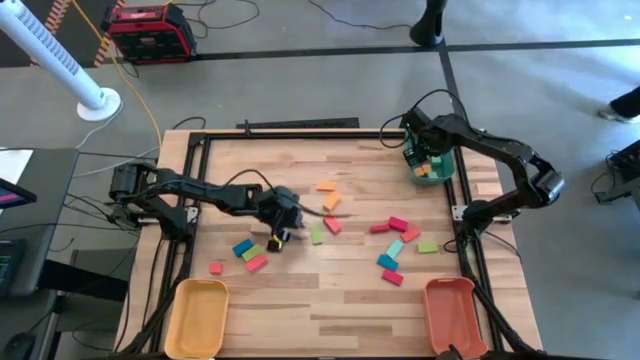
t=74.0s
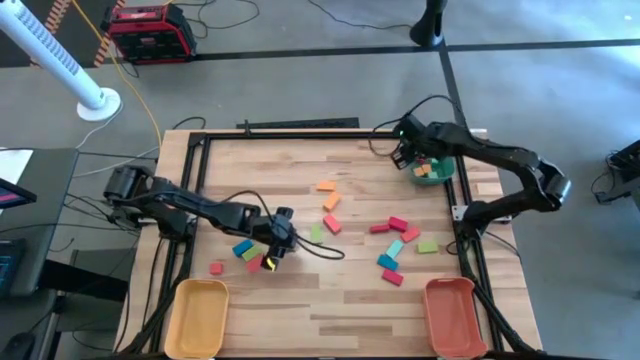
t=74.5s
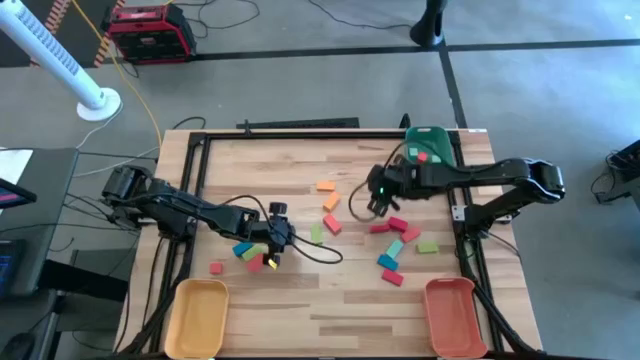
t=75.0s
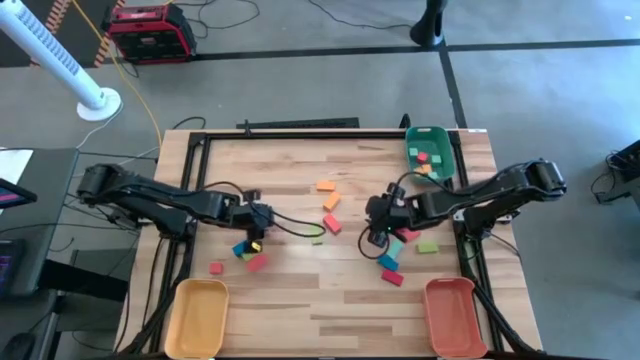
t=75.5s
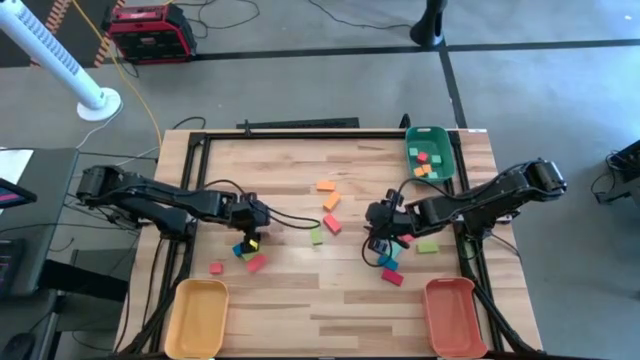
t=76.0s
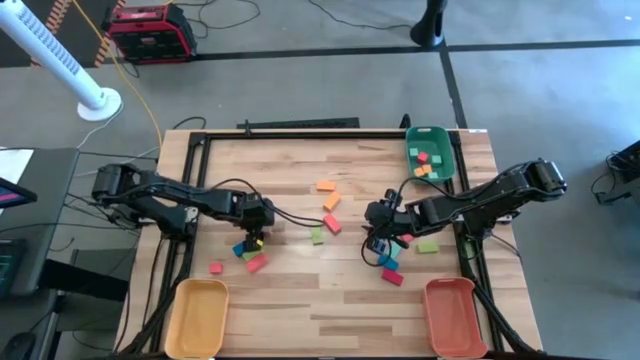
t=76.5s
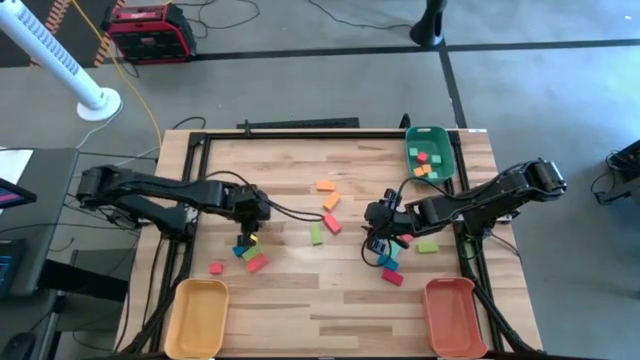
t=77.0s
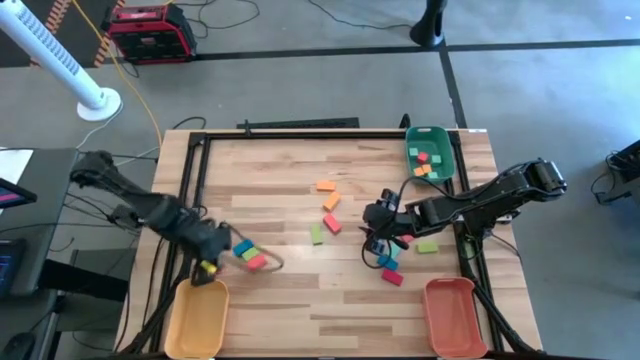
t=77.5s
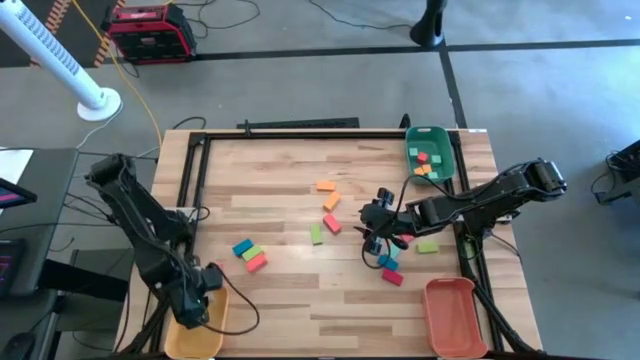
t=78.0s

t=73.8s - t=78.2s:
Task: Sort blocks by size
Put the yellow thick rectangle block into the yellow bin

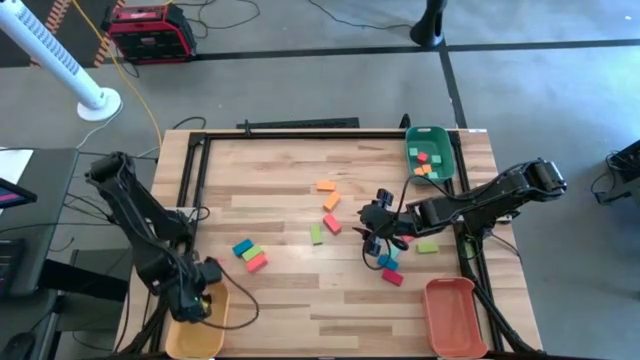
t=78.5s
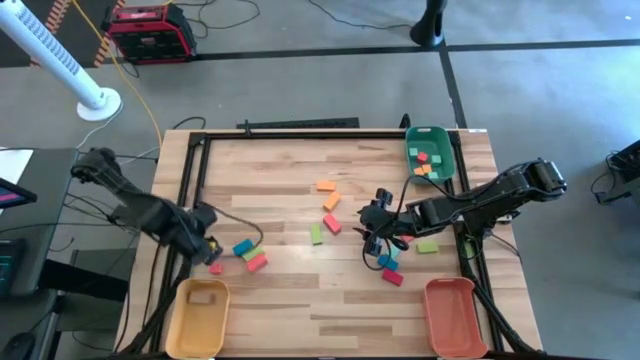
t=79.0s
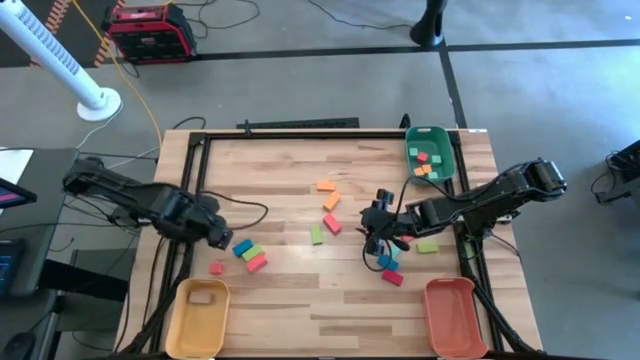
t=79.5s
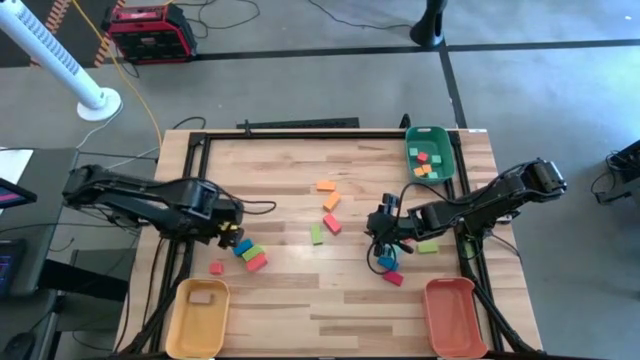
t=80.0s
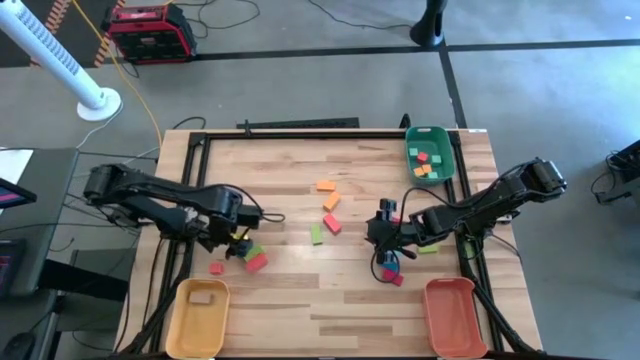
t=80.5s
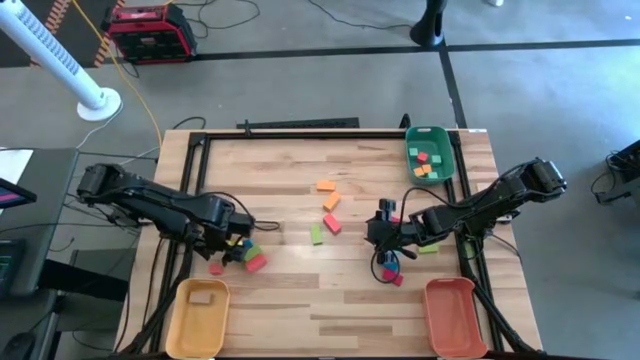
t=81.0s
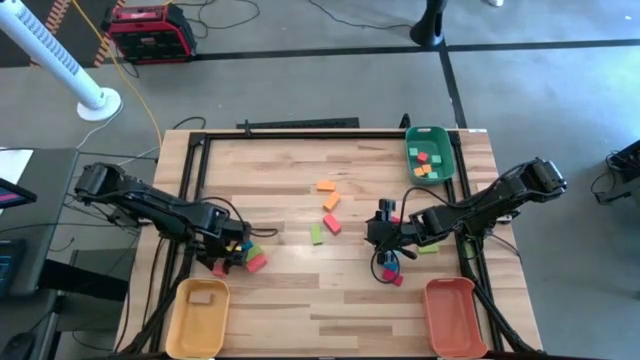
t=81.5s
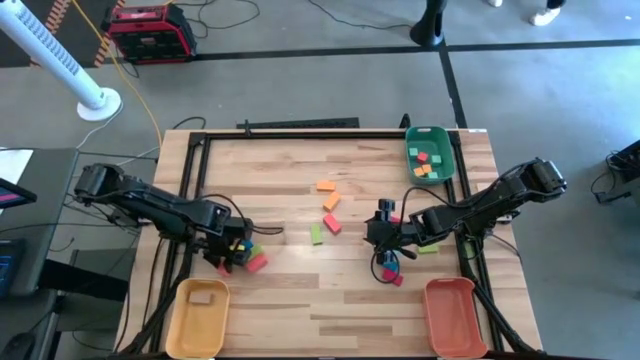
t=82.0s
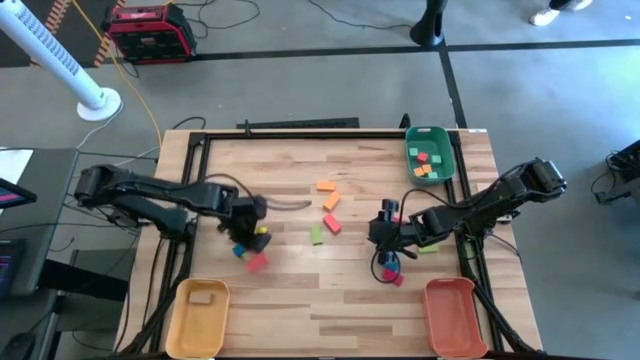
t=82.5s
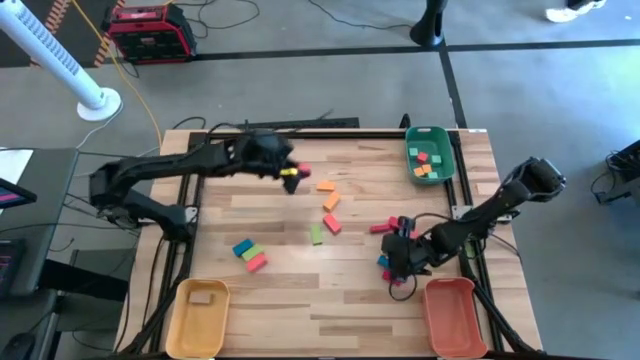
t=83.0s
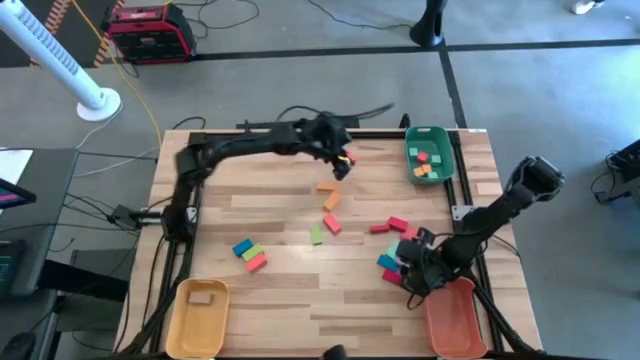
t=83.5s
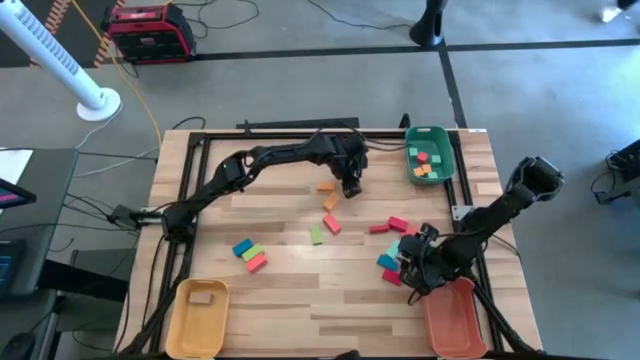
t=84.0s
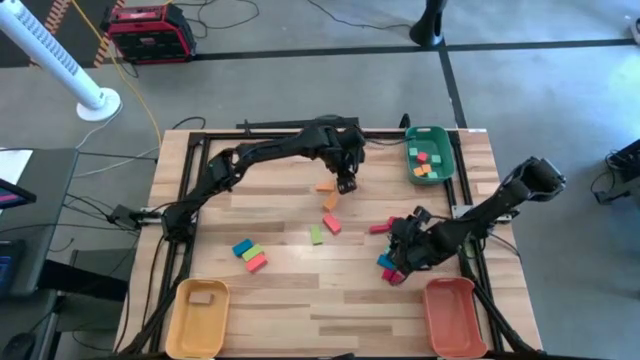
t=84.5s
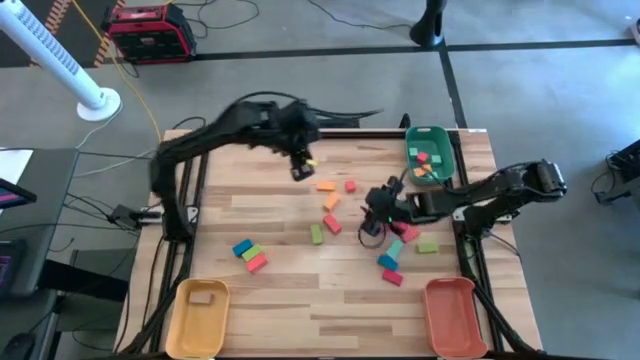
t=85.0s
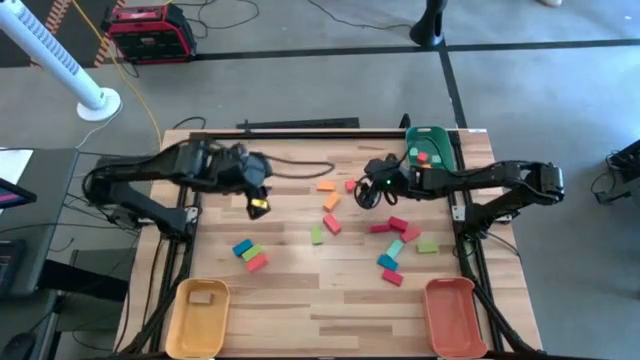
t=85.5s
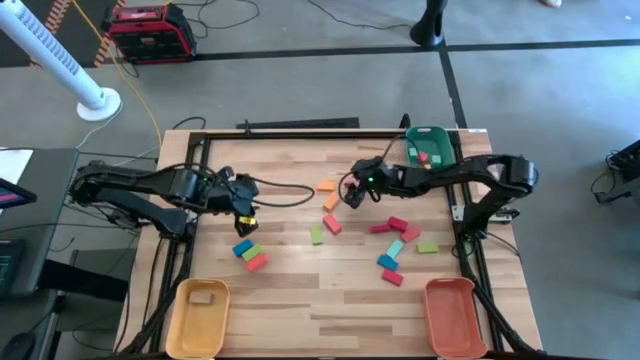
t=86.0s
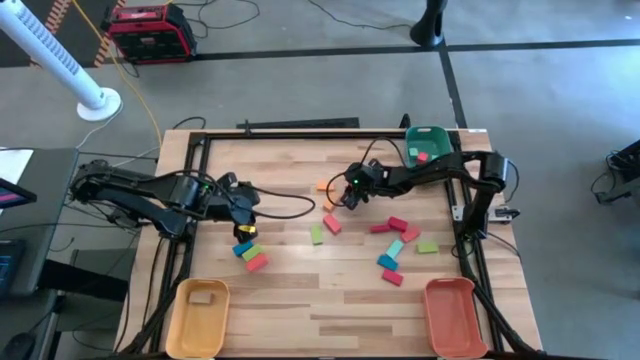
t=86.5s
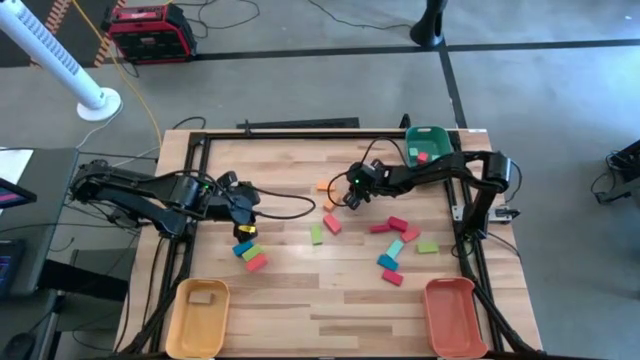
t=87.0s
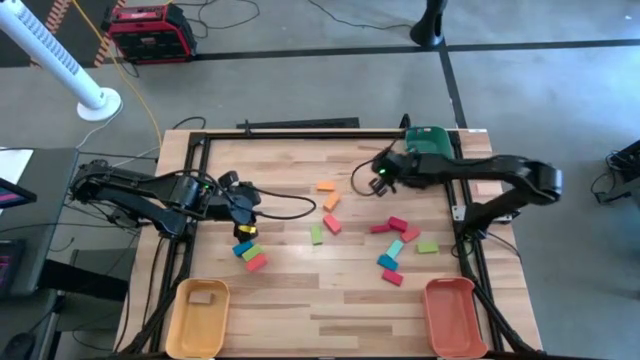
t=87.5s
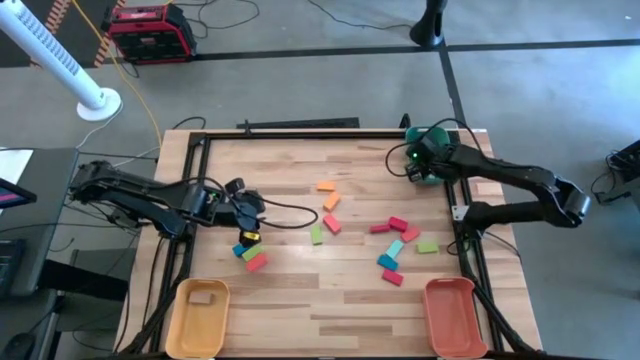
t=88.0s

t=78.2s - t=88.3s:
Put the orange square block into the green bin

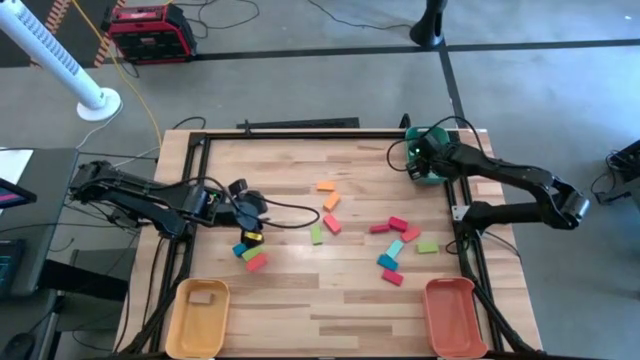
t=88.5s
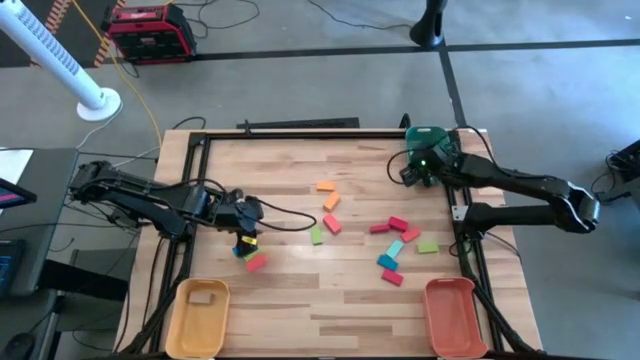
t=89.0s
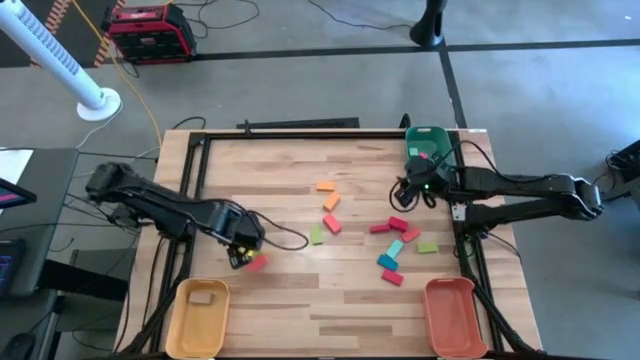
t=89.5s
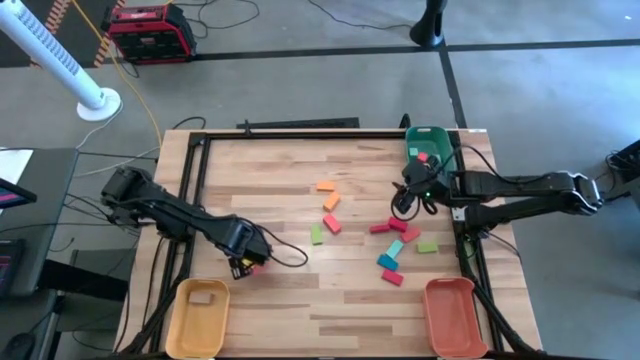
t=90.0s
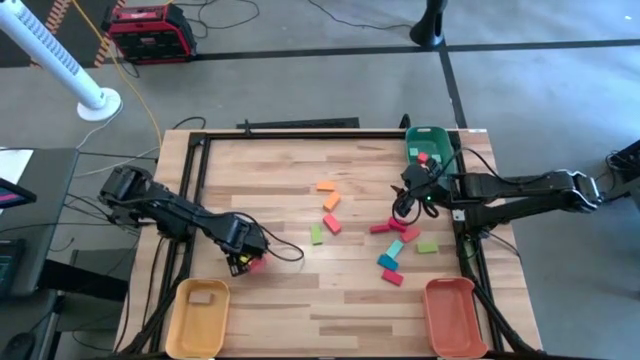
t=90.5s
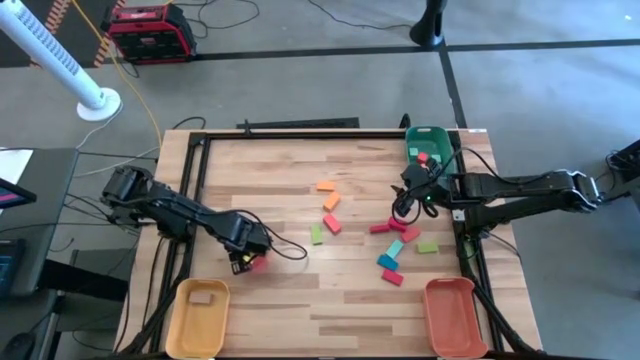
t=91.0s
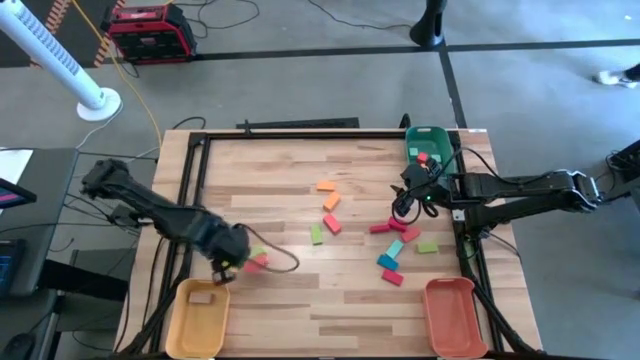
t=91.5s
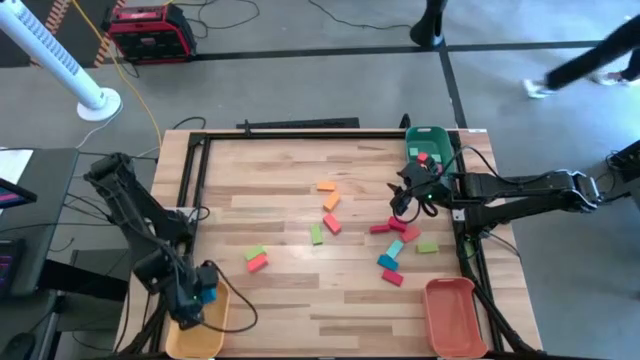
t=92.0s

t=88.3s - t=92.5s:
Put the blue thick rectangle block into the yellow bin

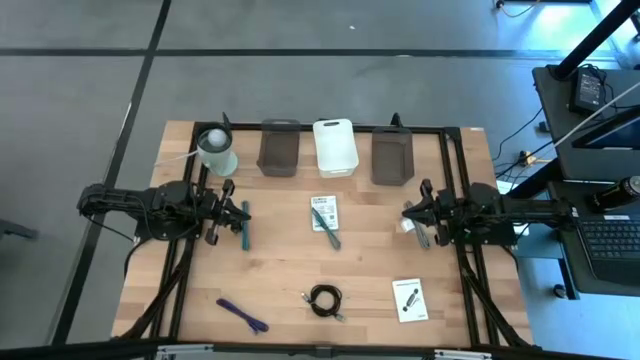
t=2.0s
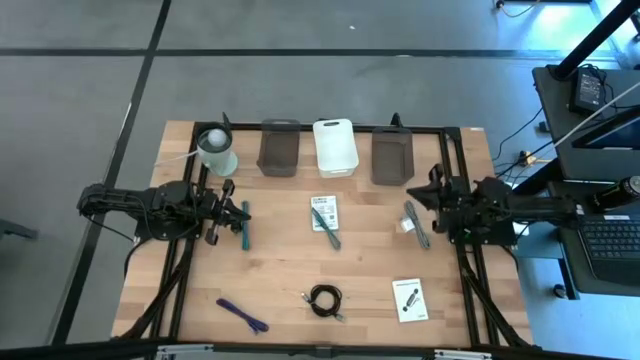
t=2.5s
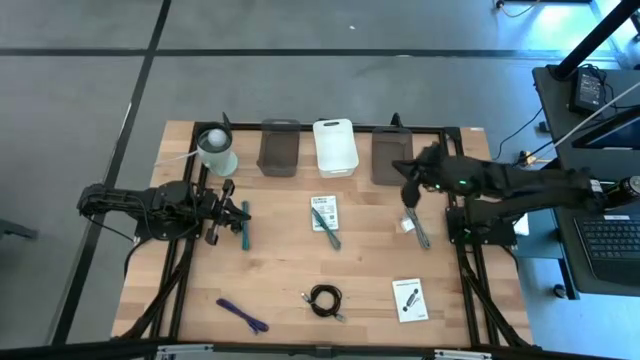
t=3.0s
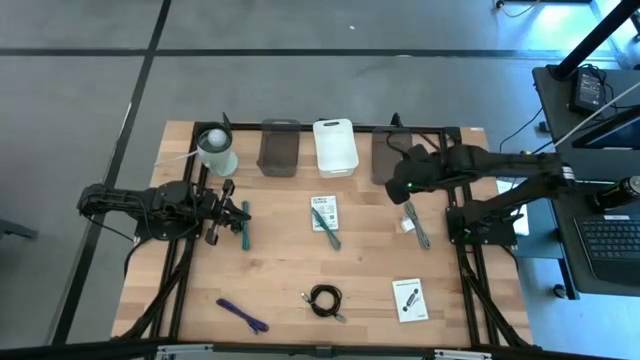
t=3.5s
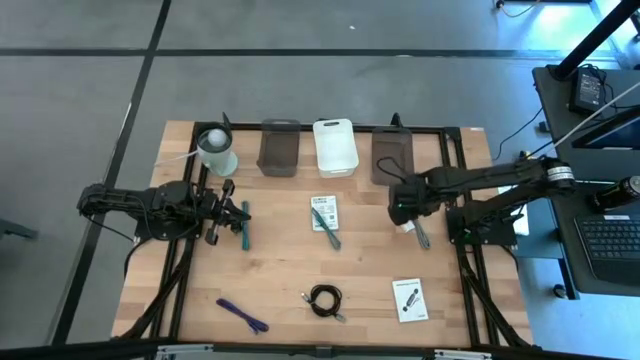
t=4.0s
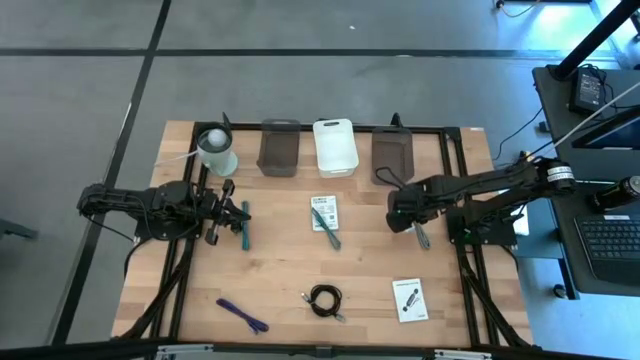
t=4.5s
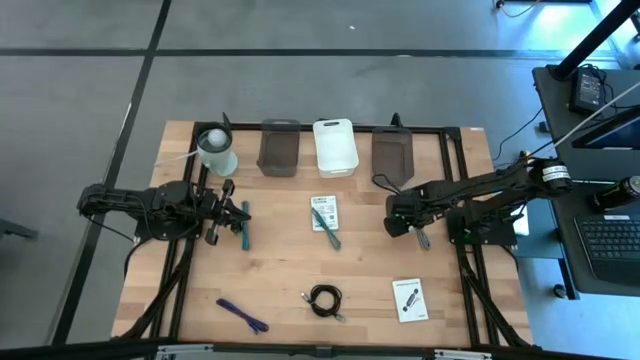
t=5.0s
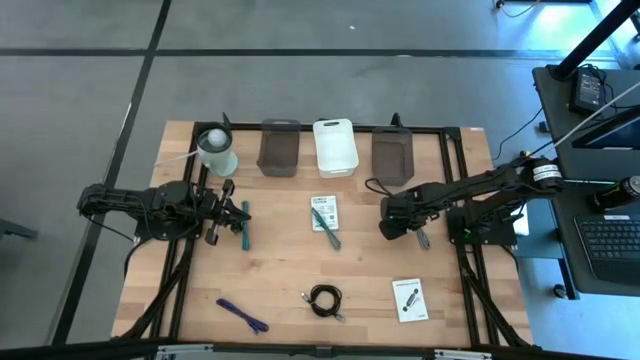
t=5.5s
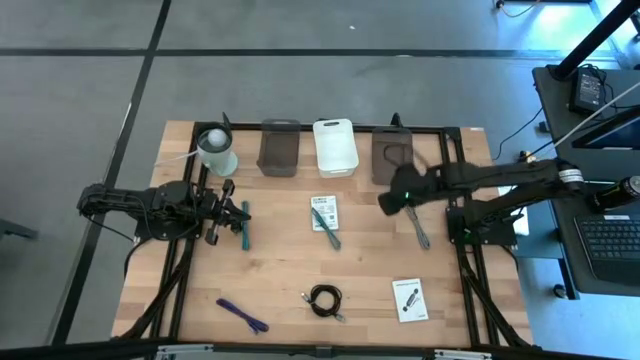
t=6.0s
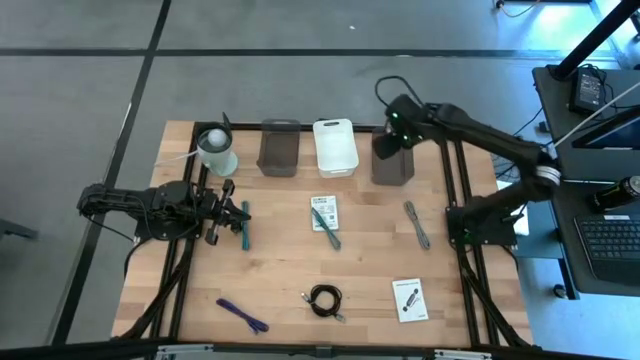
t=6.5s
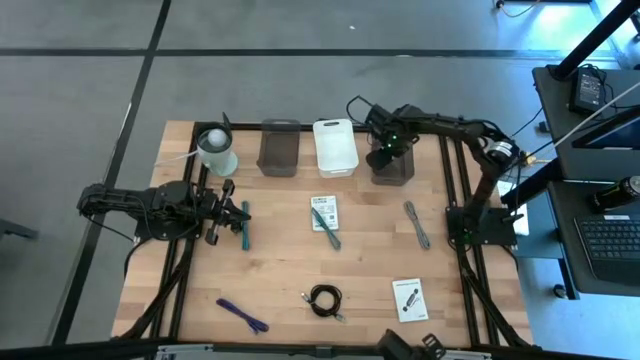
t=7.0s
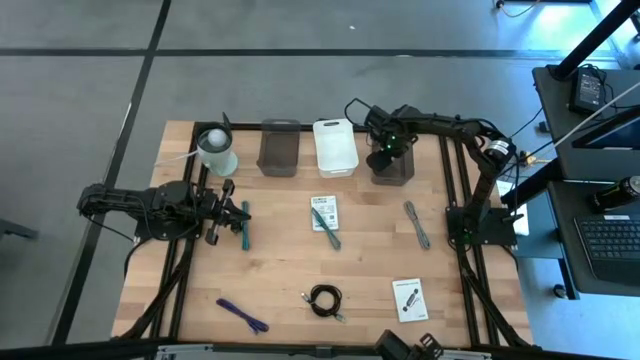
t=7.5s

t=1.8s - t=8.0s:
Task: Pick and place items into bin
Put the white charger adapter into the right black bin
